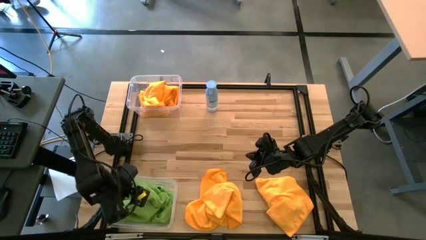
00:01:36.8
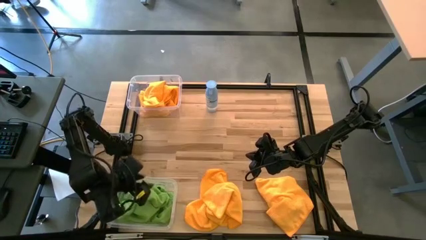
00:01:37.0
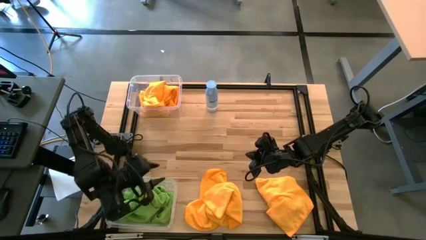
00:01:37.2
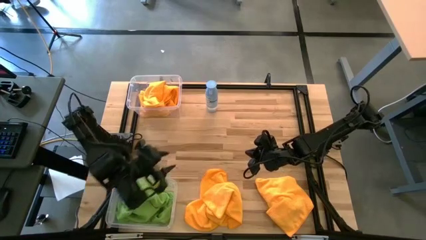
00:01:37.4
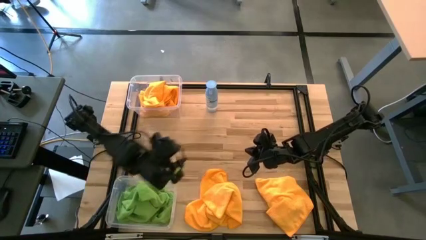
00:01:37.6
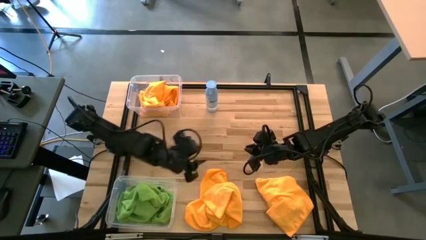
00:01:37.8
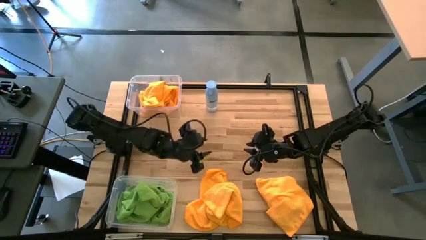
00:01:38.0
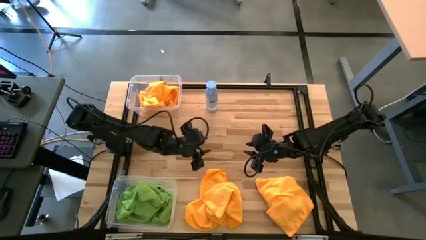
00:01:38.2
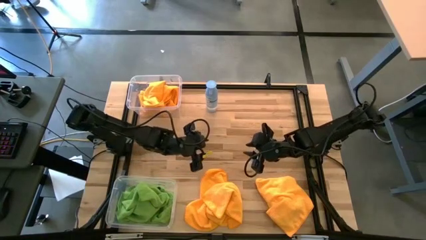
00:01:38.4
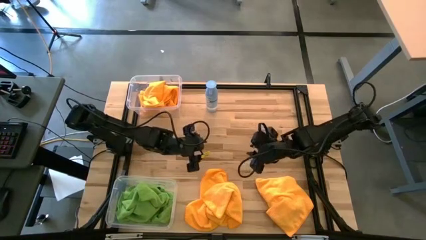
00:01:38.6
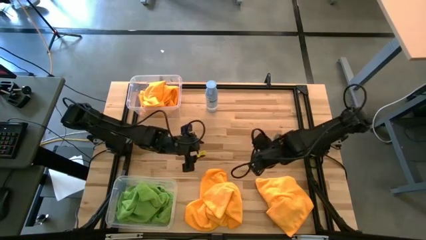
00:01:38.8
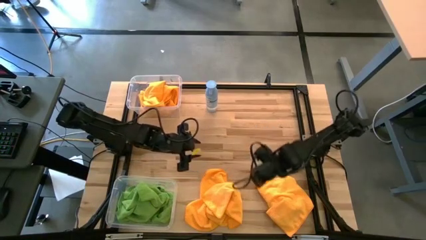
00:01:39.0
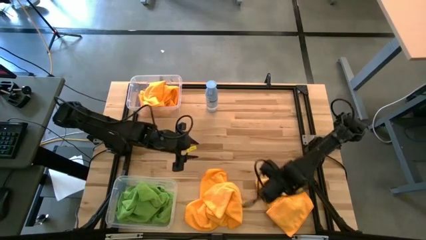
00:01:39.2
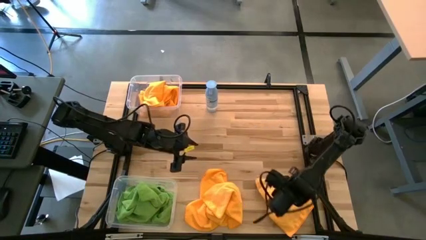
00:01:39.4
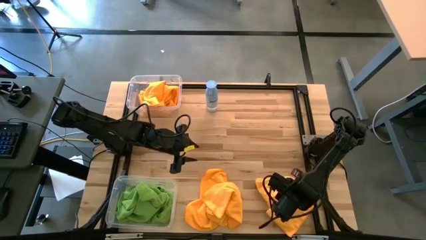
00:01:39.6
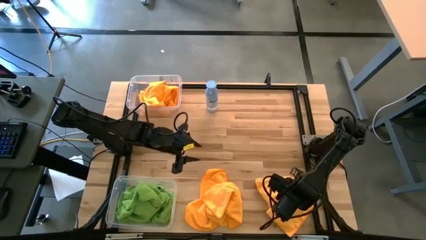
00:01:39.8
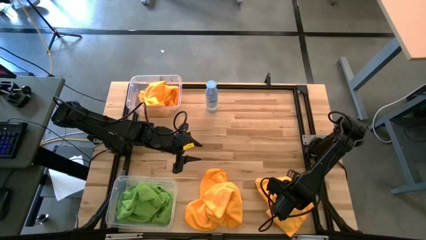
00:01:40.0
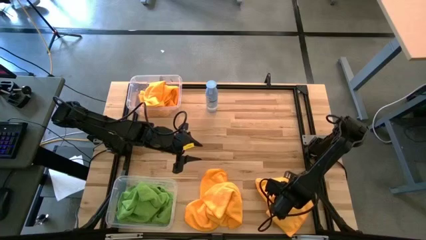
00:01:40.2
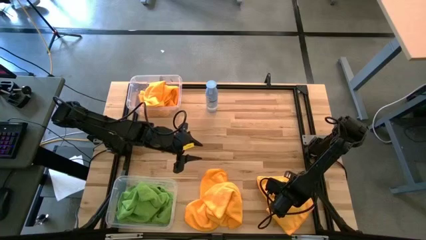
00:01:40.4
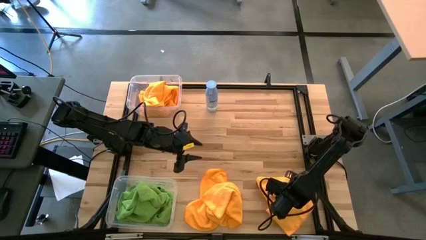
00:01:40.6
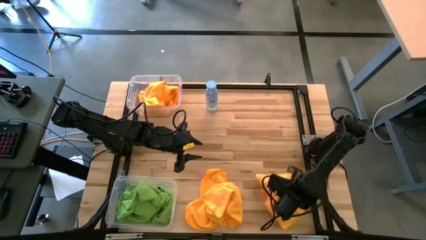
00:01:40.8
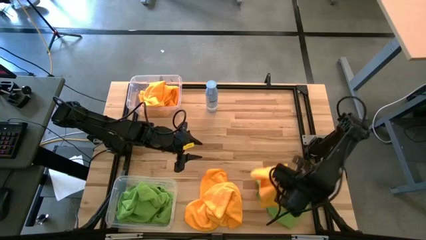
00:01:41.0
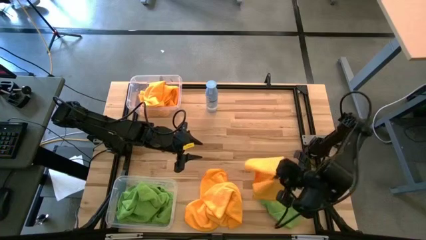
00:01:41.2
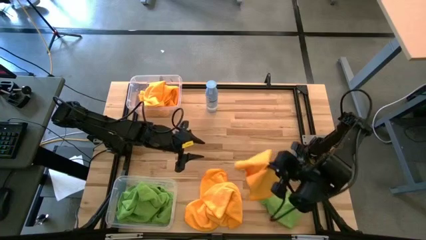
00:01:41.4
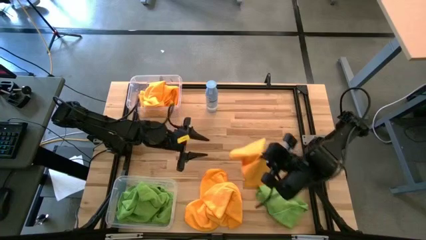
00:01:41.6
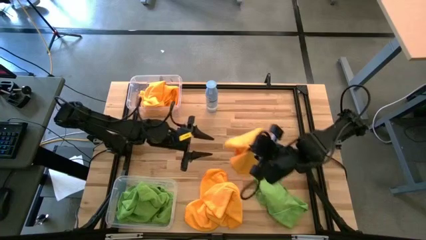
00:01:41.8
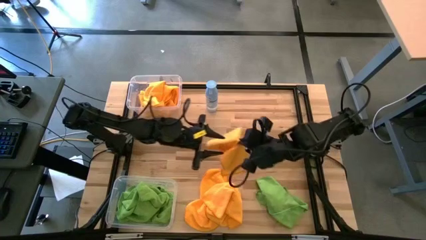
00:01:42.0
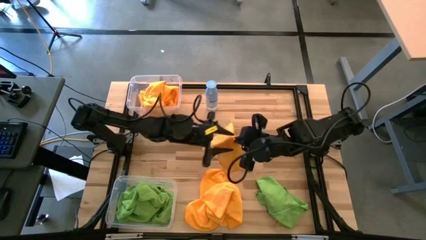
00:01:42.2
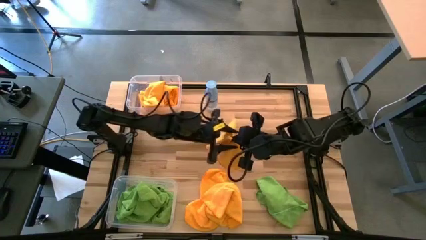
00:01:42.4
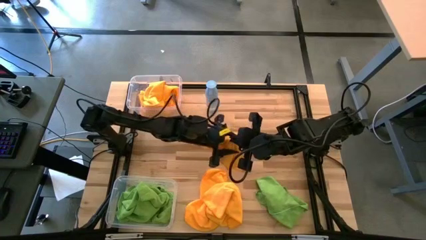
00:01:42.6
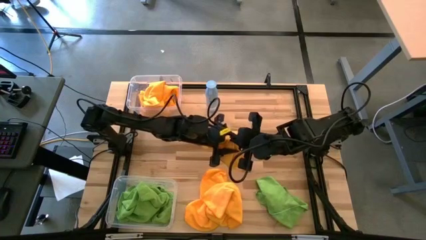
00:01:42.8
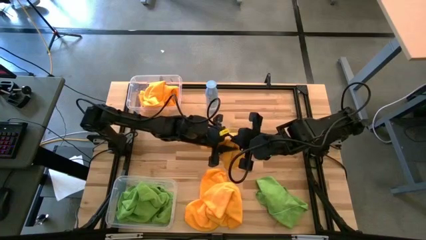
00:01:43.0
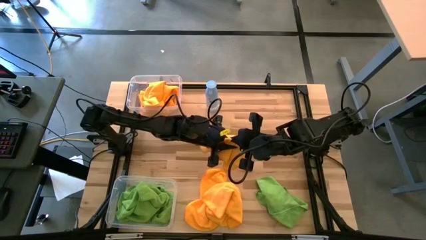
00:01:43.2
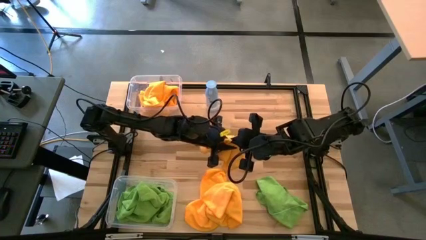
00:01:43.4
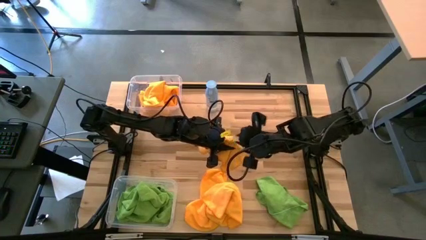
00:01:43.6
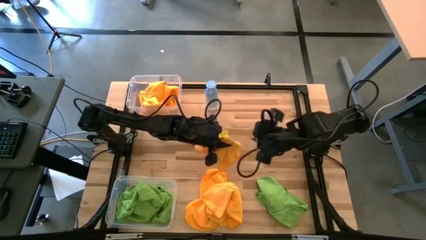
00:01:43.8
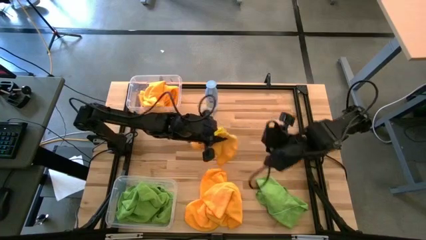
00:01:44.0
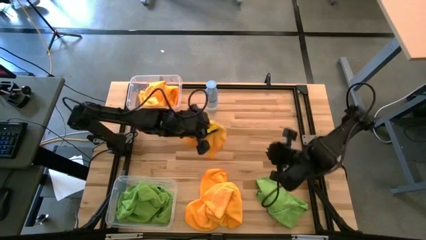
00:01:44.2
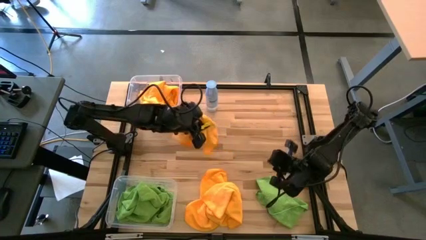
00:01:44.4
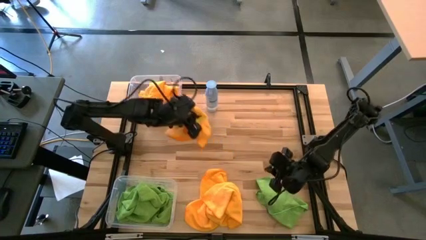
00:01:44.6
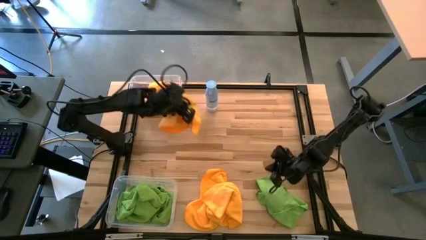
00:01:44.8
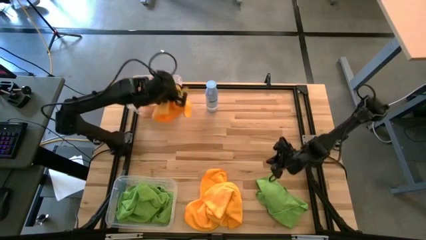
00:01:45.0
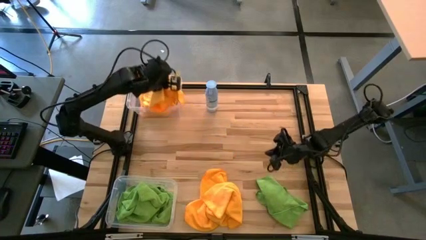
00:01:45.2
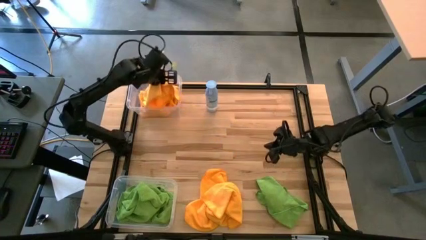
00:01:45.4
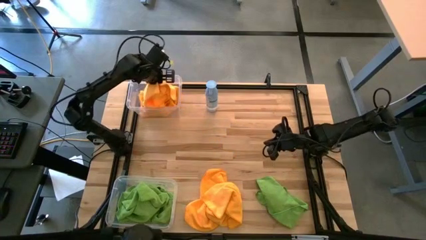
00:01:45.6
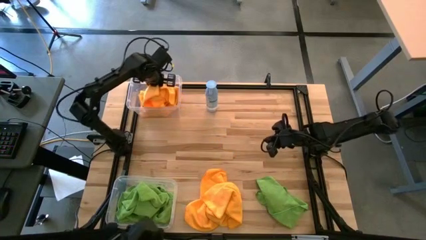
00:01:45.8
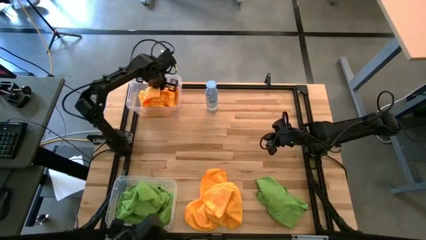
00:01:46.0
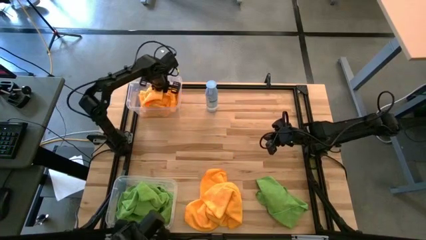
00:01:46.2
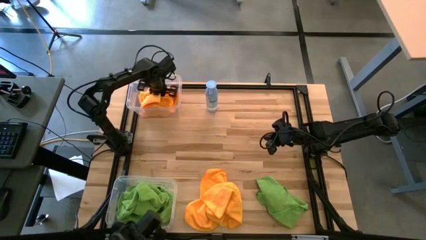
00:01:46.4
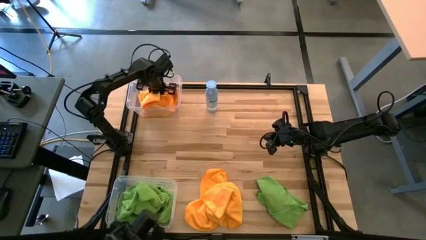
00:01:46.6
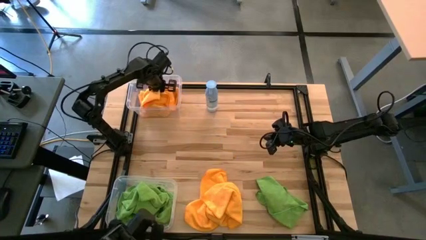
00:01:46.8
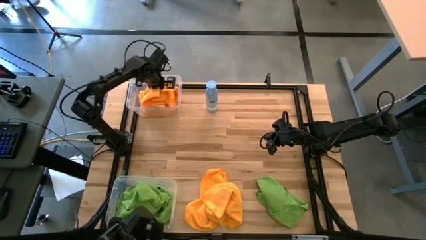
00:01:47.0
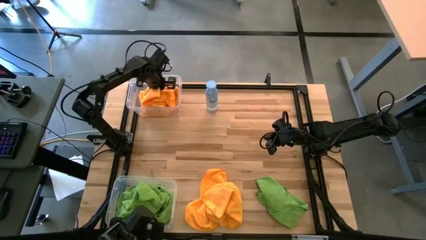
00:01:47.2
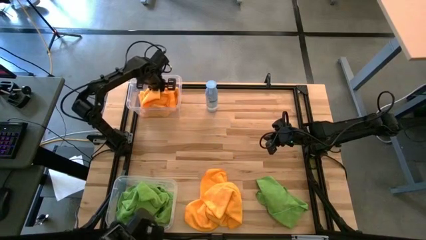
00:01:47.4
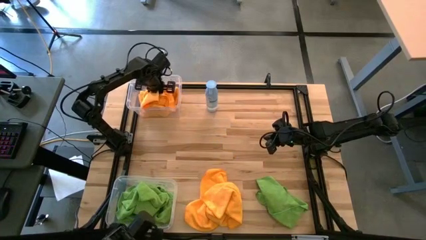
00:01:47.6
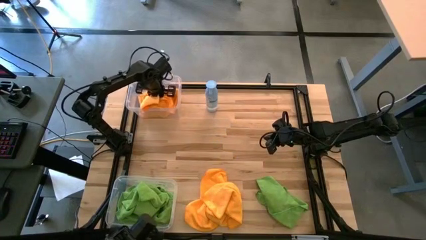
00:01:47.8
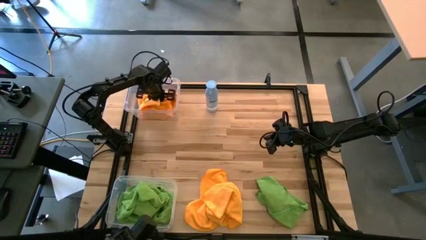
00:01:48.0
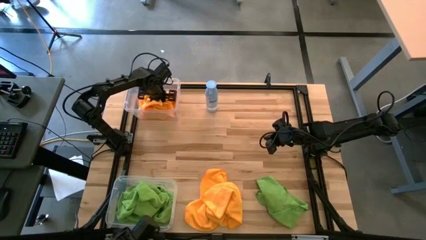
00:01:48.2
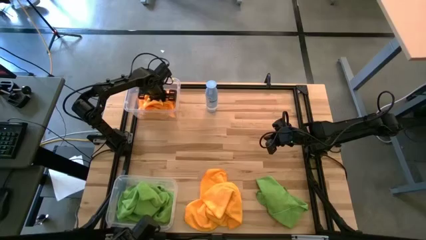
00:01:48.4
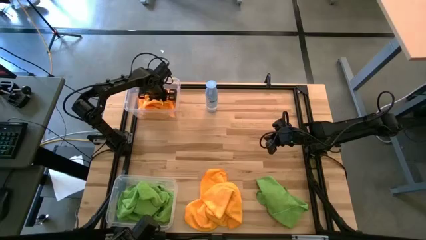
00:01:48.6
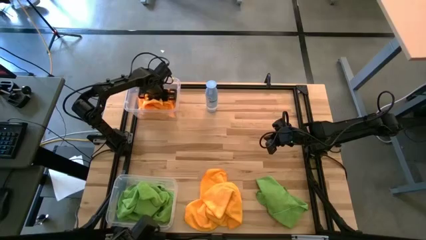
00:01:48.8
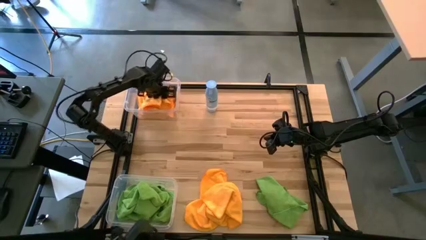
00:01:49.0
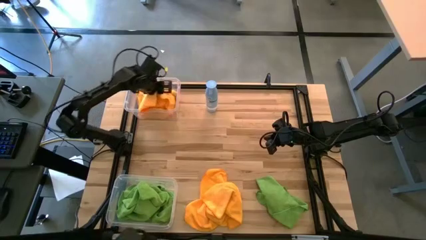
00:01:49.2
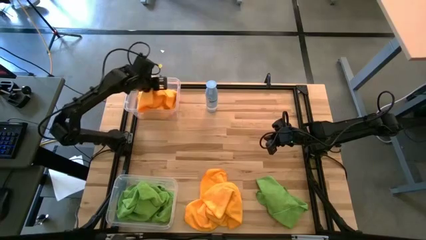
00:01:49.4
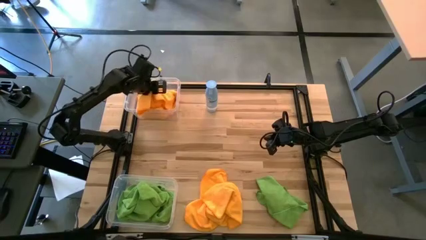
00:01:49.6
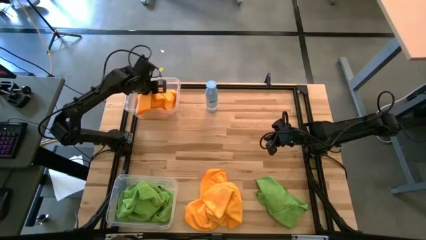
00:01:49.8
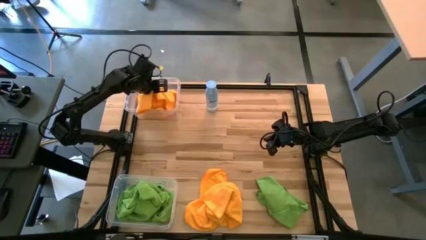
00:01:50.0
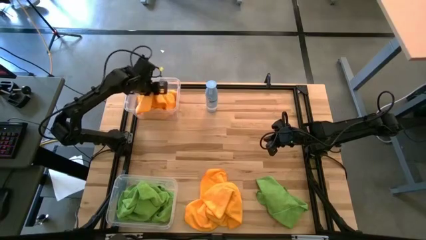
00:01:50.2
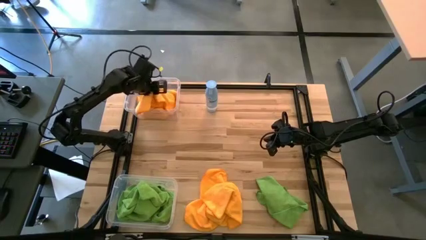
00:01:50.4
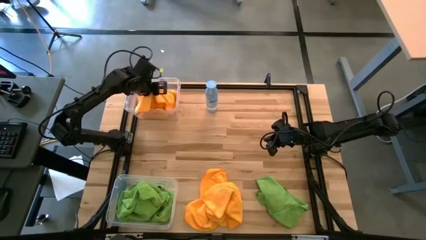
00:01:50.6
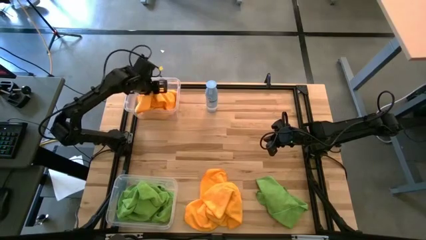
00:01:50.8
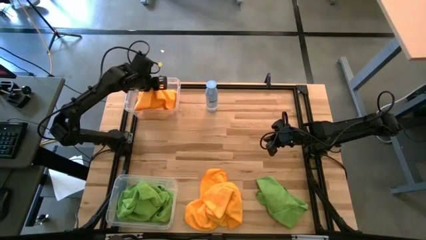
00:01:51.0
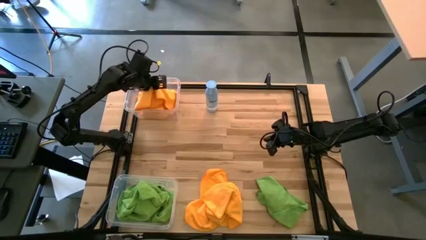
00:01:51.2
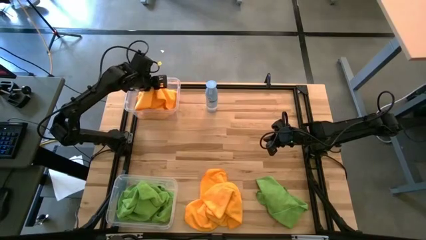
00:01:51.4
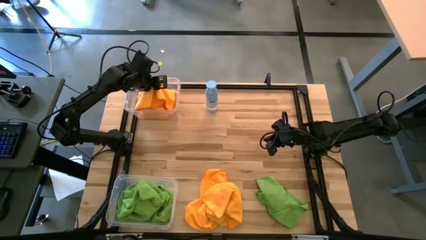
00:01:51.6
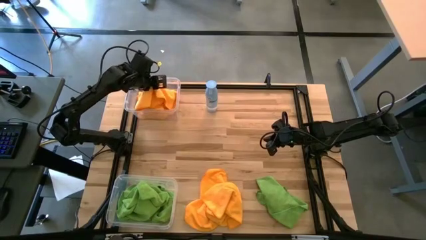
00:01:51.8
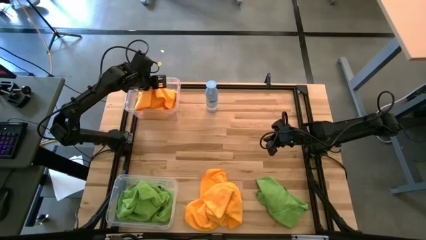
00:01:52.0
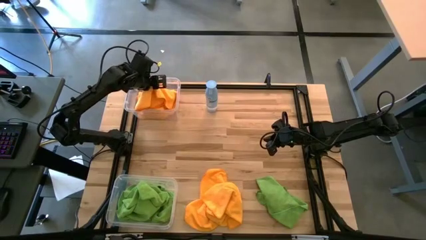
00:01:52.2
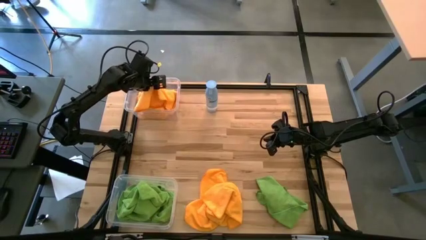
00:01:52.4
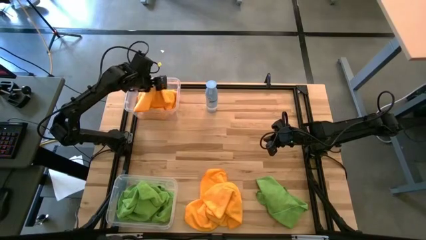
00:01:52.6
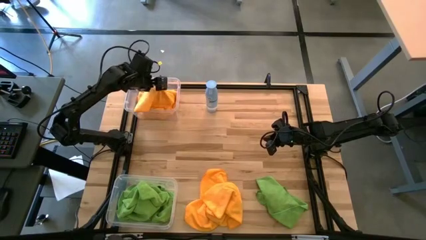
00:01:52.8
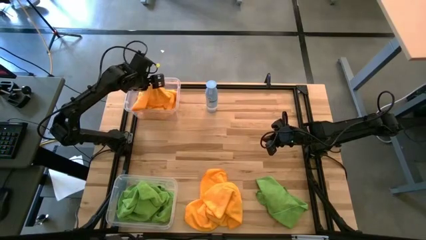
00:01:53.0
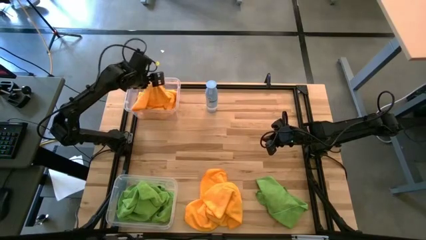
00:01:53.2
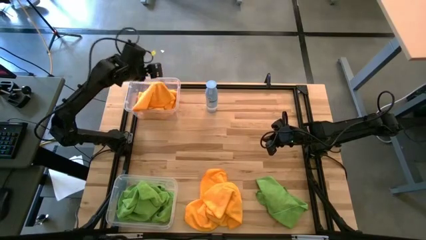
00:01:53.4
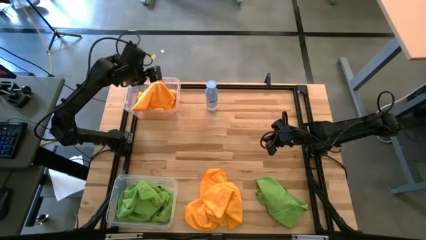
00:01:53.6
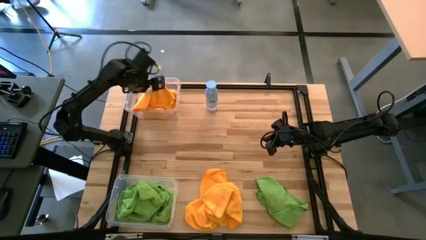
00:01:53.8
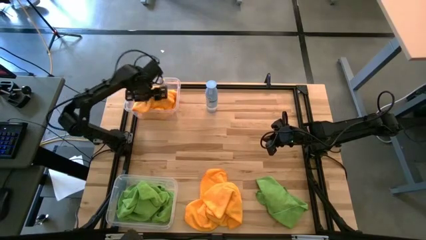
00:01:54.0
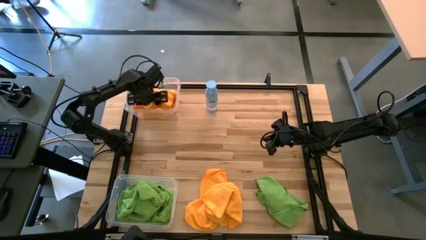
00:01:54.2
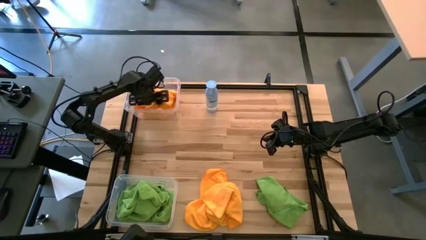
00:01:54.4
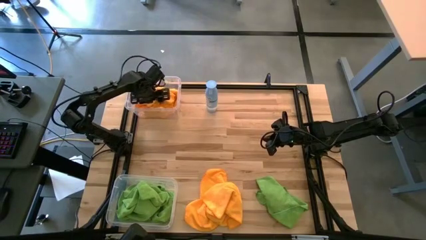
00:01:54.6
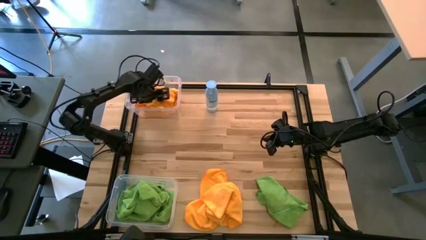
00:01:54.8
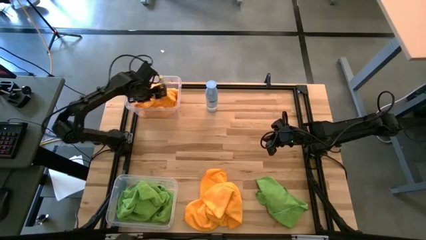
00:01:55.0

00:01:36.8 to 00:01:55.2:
Task: Sort microfiber towel by color & place in baskets
Put the yellow microfiber towel into the top transparent bin
